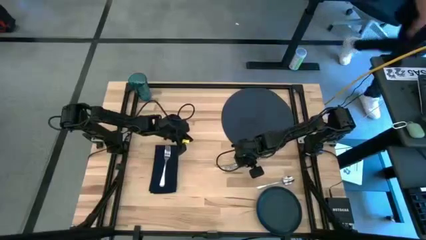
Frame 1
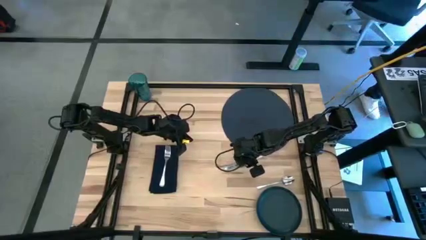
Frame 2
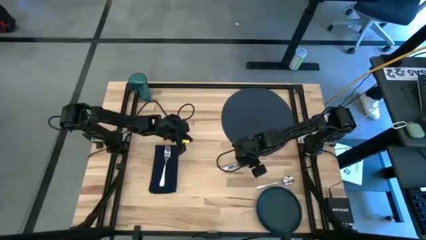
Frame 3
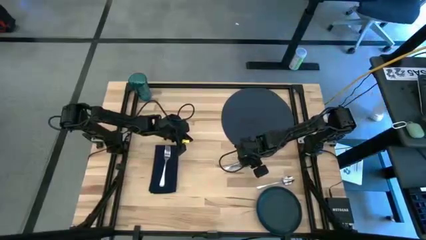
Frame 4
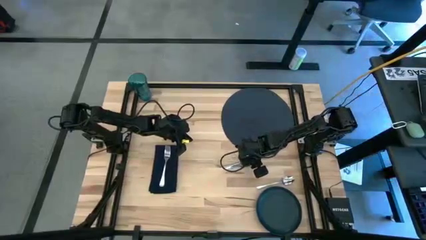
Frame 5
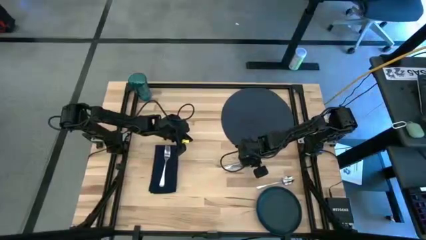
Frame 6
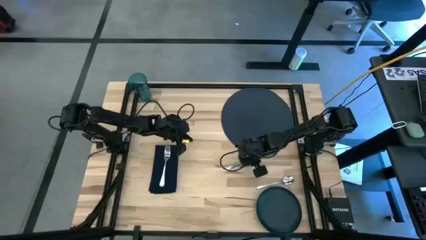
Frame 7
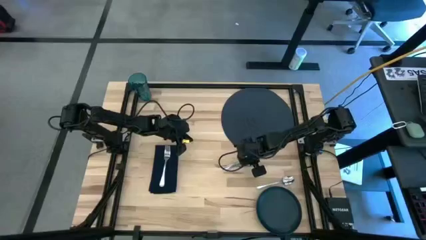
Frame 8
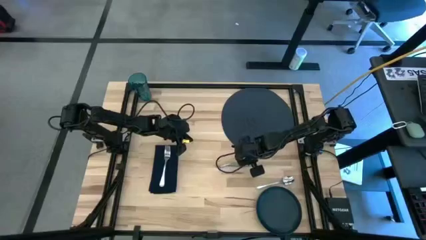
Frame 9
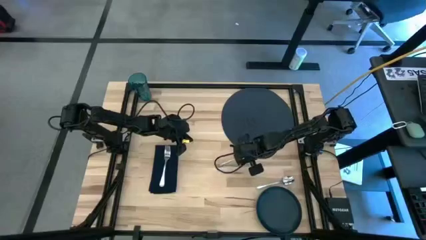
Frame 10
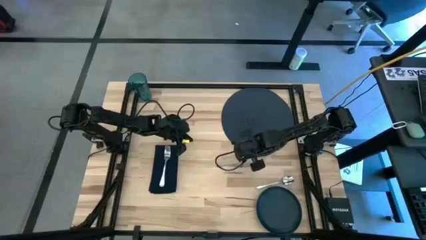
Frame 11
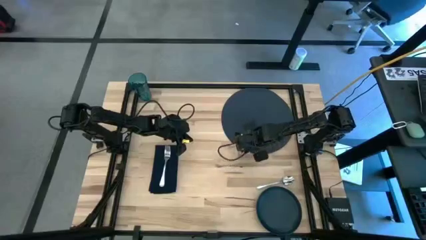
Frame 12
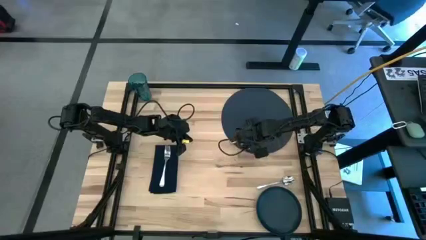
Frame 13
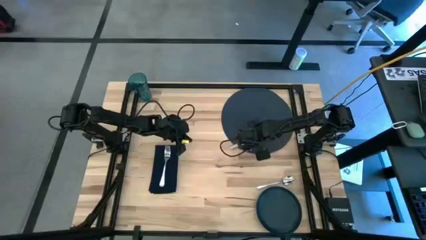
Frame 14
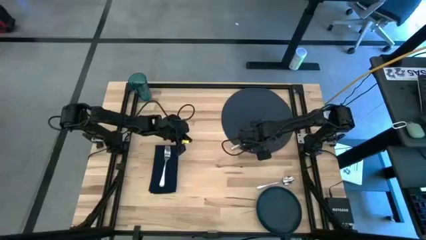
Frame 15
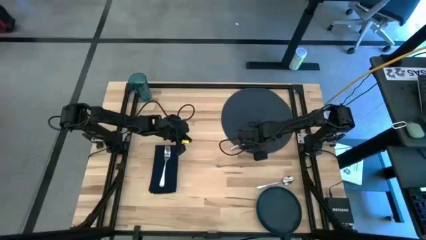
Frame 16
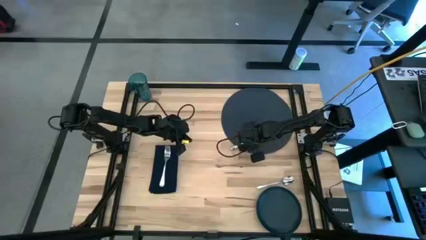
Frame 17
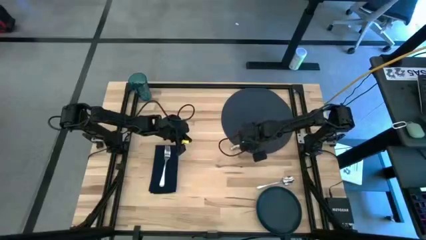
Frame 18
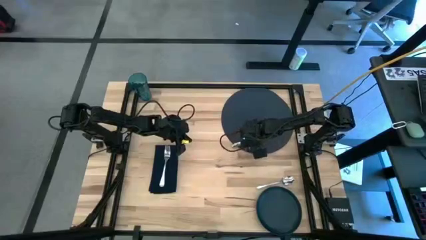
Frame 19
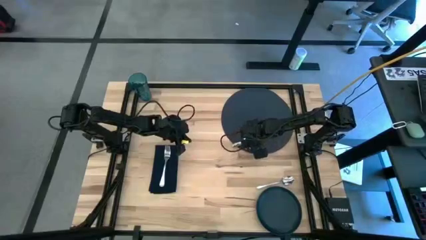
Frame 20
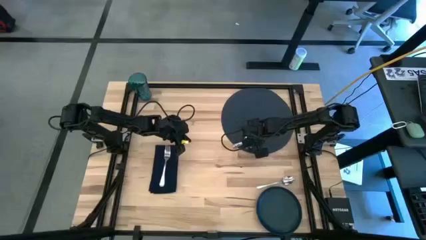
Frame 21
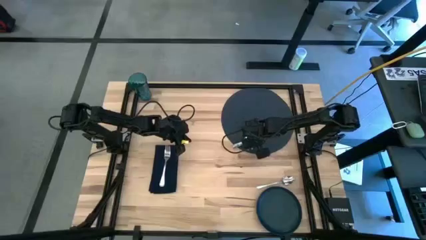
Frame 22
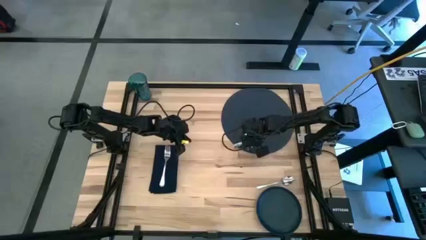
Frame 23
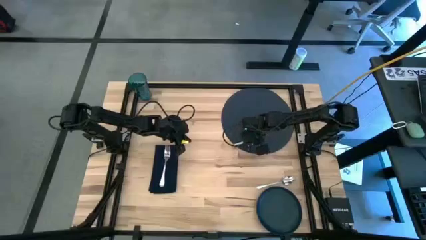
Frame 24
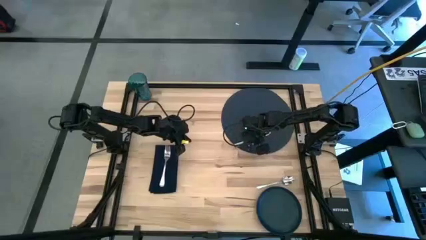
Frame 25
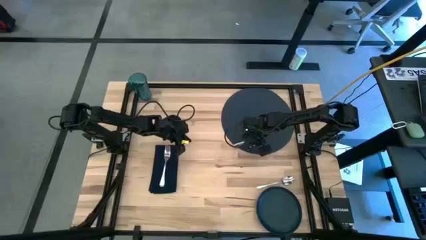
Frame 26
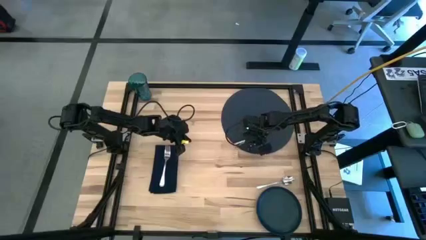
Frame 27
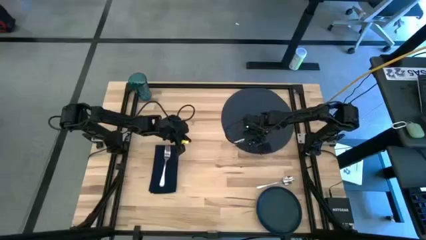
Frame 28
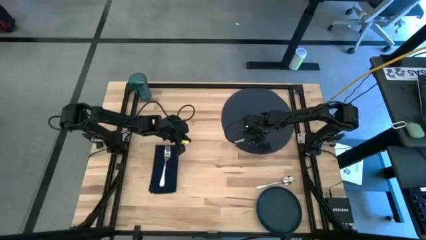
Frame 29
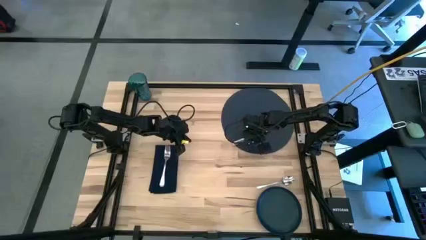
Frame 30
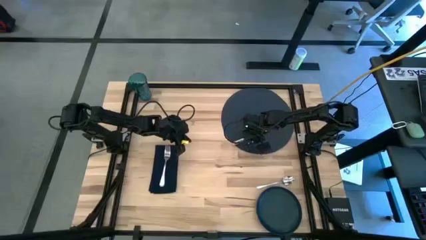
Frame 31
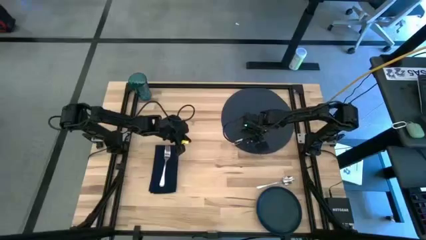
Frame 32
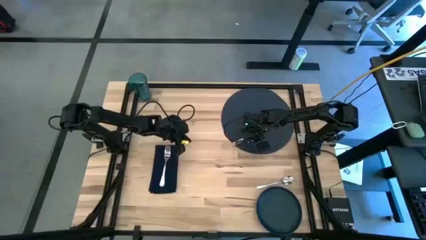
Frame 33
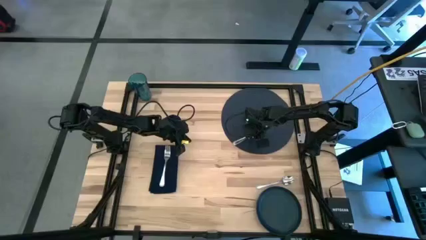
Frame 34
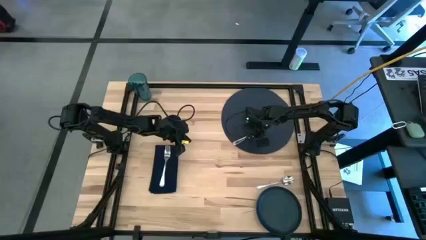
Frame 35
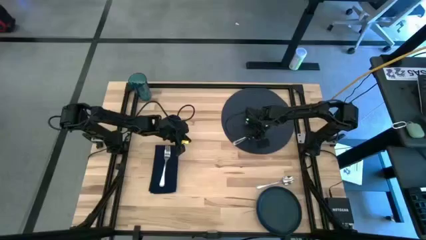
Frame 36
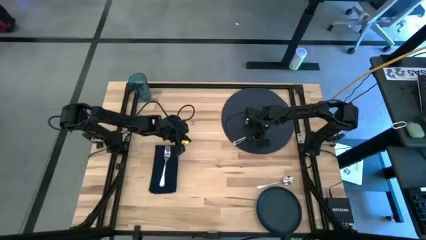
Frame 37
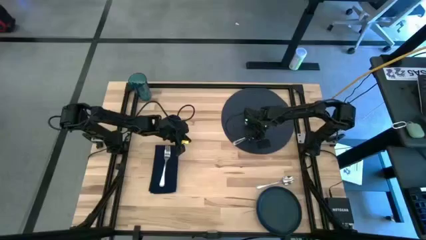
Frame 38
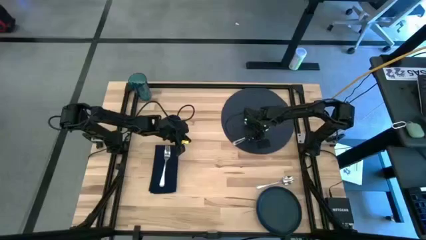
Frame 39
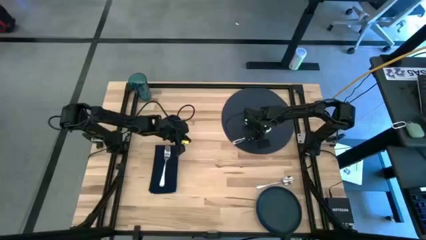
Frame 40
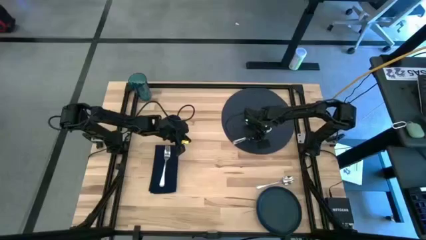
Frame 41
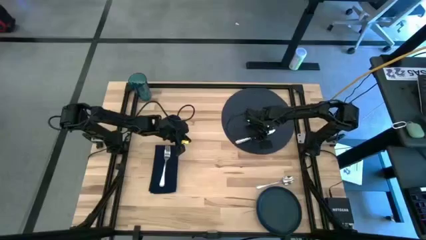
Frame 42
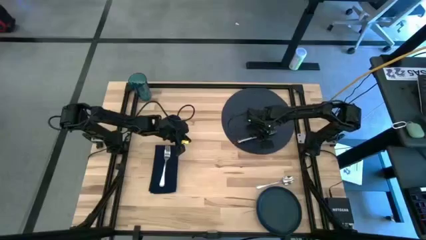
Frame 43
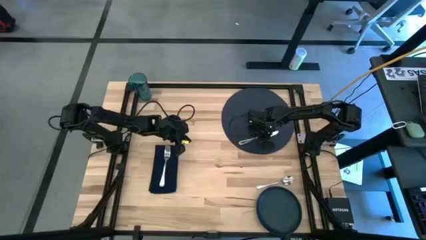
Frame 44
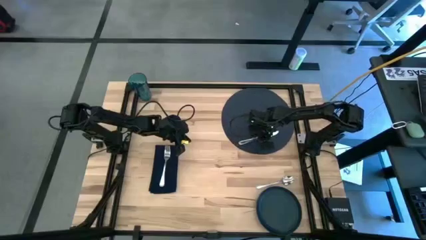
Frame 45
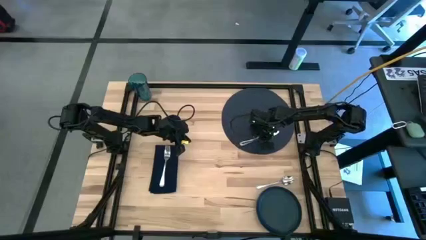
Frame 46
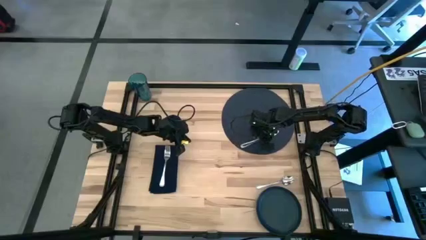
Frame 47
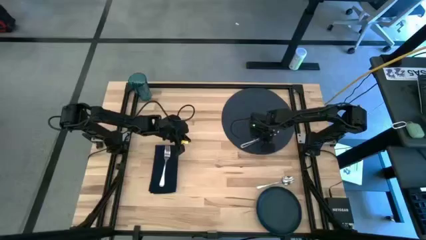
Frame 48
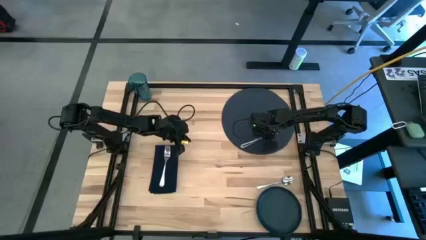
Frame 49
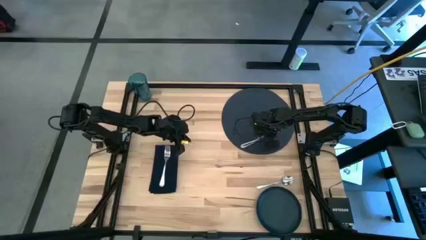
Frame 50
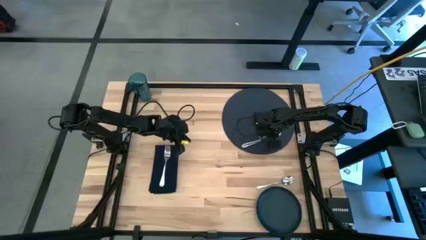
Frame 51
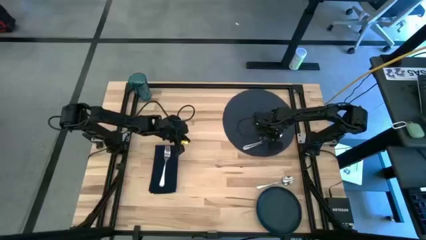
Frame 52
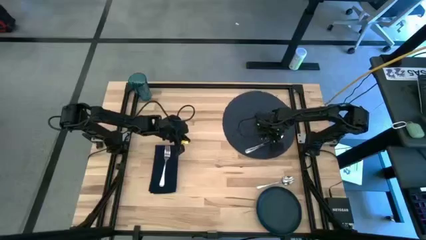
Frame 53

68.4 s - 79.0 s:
Task: Set table place
Put the silver table knife on the black tablemat
